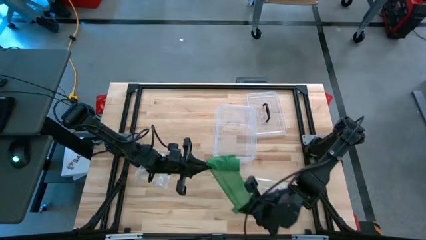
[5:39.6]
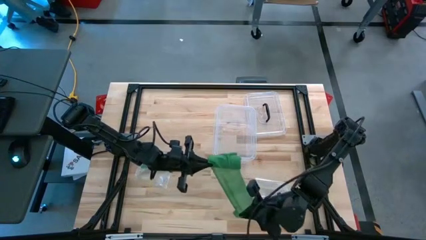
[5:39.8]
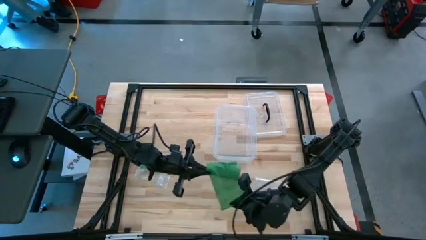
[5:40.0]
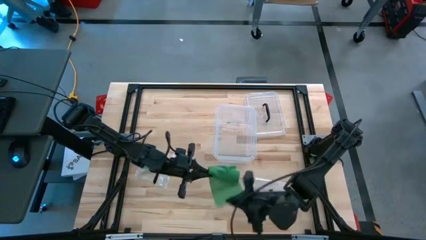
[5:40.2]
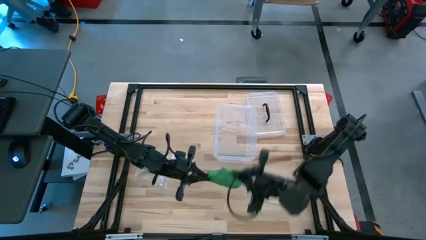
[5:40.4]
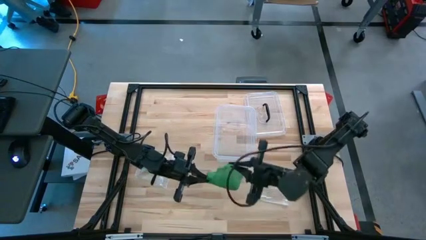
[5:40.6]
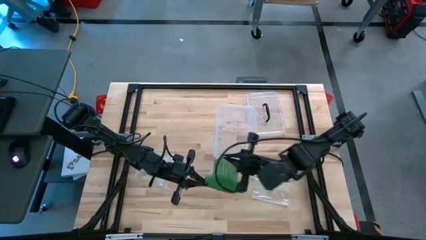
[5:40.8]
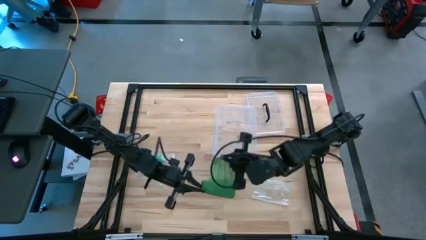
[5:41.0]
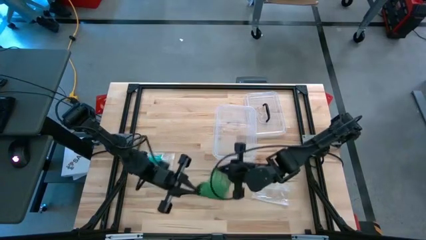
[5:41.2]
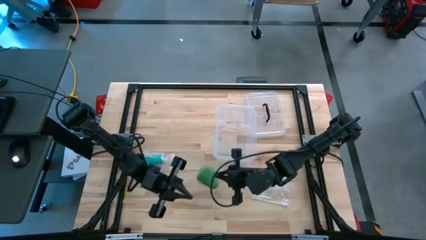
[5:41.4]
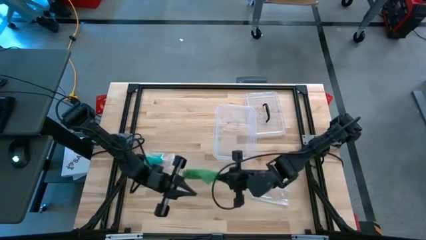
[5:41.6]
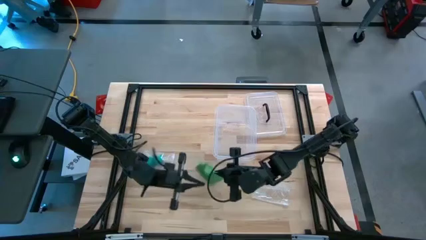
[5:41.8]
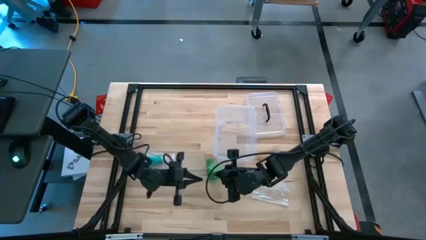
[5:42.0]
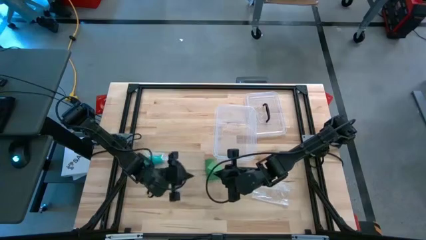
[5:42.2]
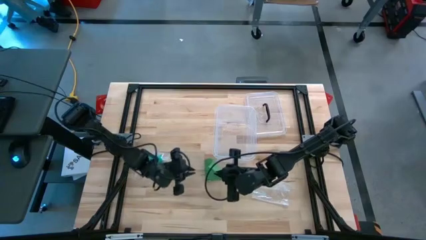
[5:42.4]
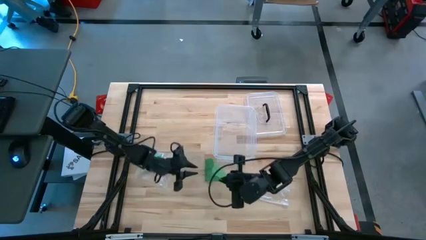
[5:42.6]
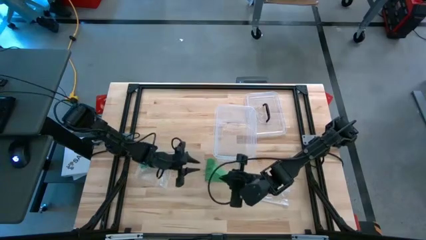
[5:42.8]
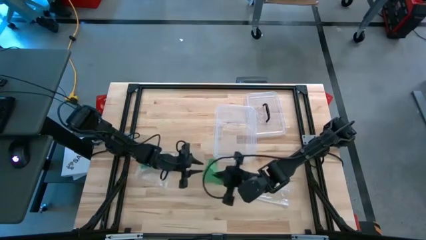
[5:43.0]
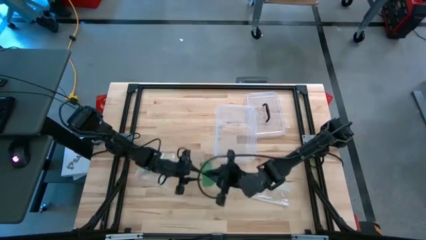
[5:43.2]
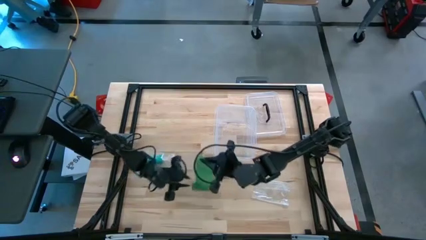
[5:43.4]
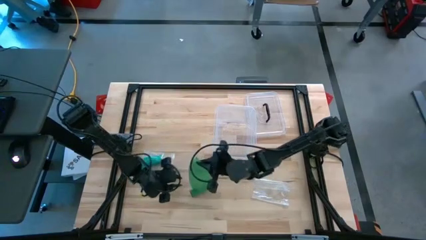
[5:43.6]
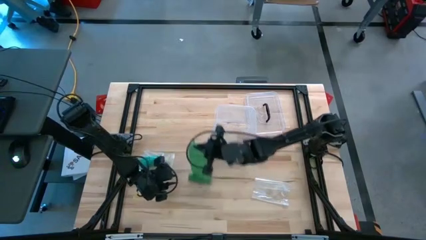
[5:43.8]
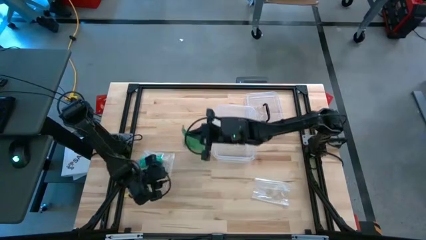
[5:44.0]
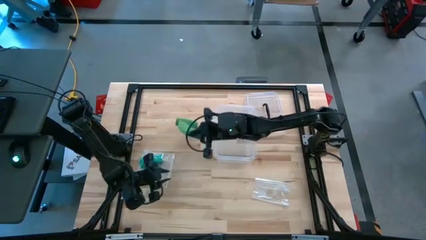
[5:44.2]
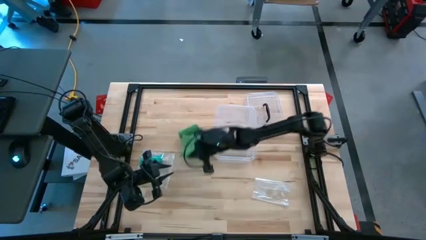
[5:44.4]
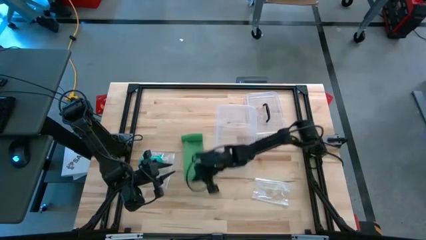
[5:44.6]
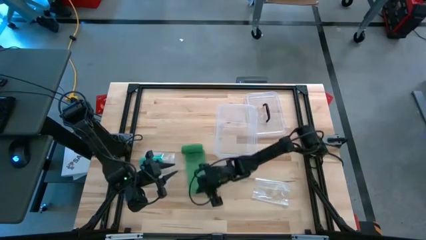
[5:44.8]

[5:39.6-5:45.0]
Task: Roll bandage
Roll the green bandage

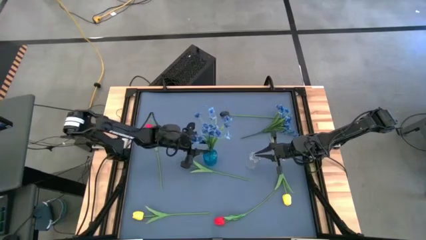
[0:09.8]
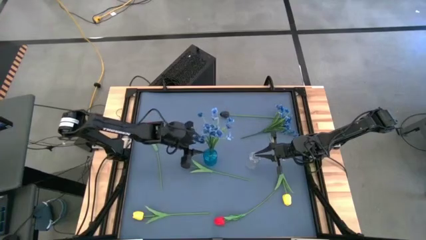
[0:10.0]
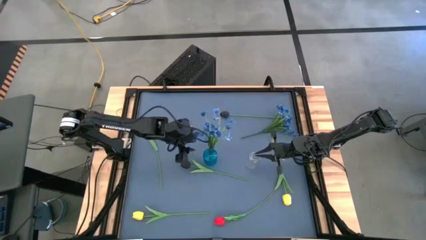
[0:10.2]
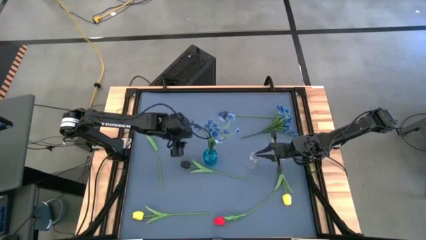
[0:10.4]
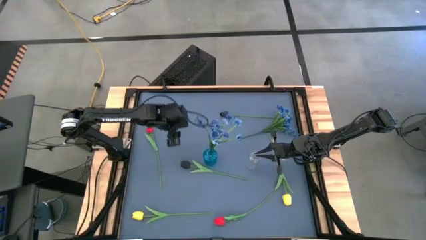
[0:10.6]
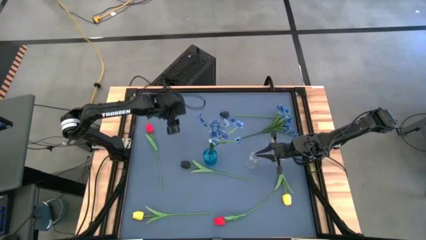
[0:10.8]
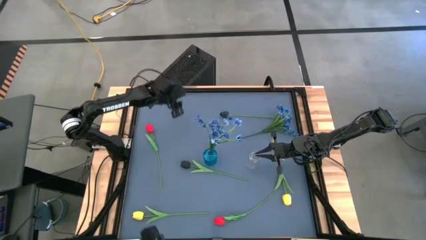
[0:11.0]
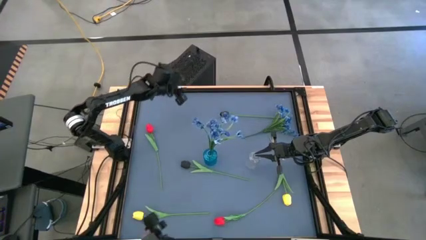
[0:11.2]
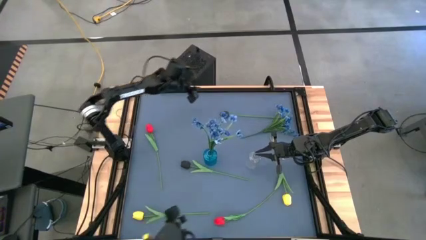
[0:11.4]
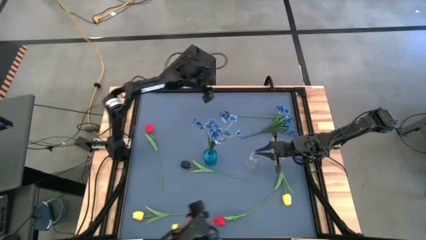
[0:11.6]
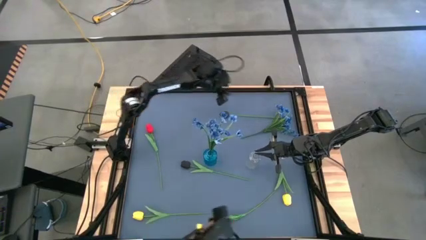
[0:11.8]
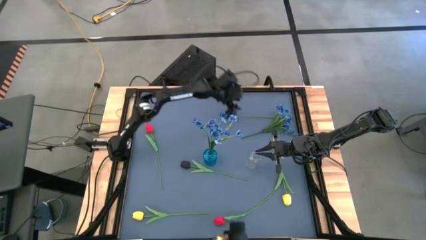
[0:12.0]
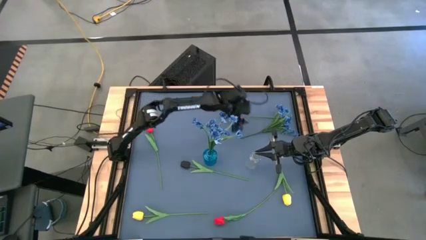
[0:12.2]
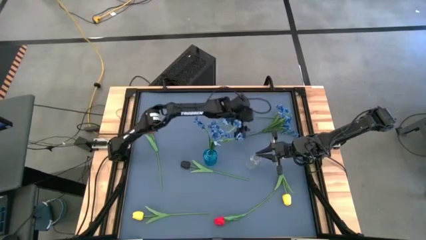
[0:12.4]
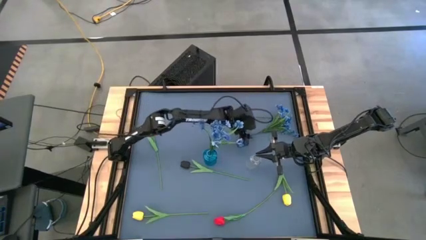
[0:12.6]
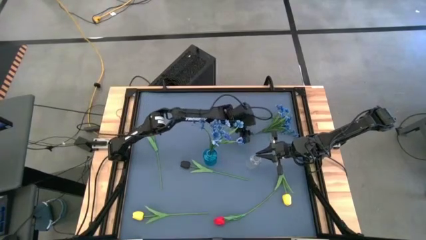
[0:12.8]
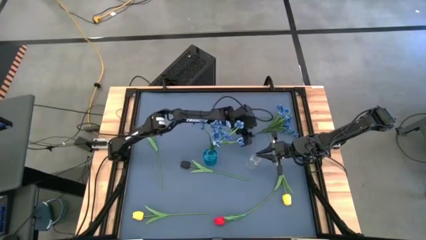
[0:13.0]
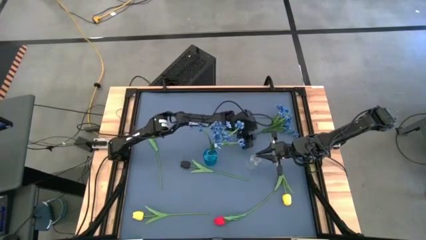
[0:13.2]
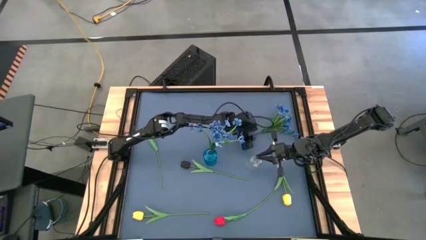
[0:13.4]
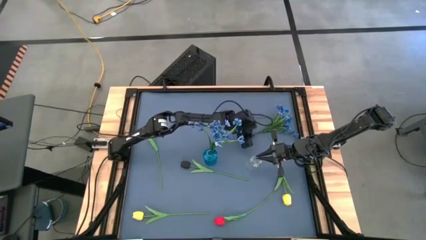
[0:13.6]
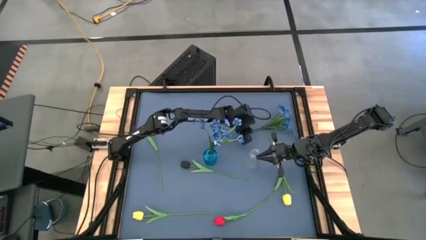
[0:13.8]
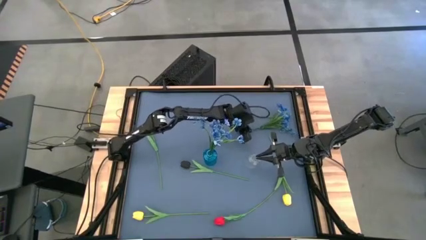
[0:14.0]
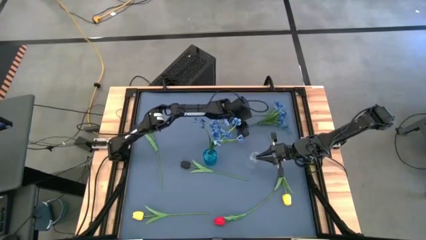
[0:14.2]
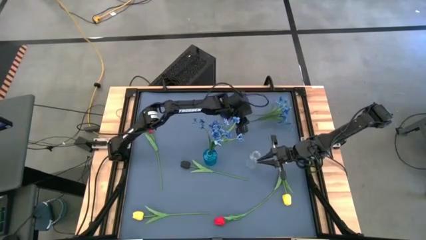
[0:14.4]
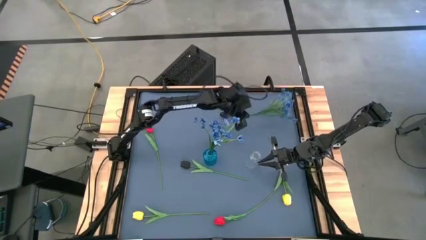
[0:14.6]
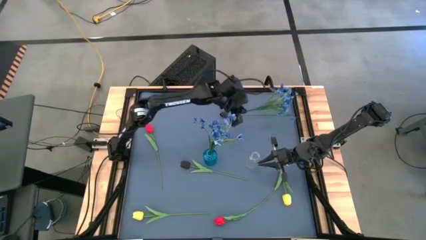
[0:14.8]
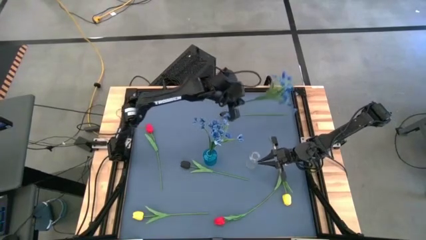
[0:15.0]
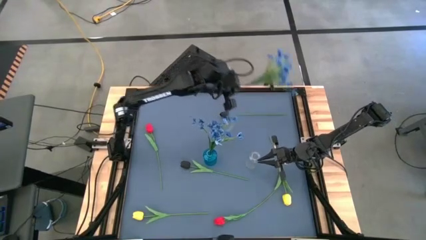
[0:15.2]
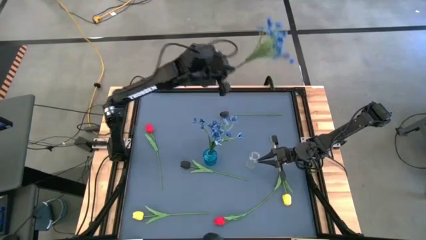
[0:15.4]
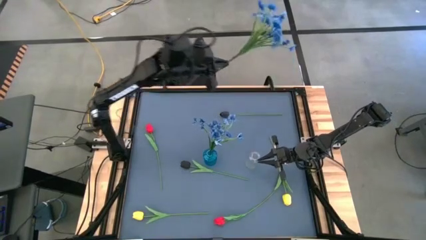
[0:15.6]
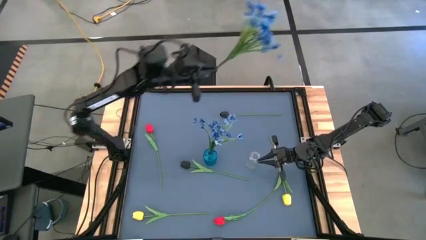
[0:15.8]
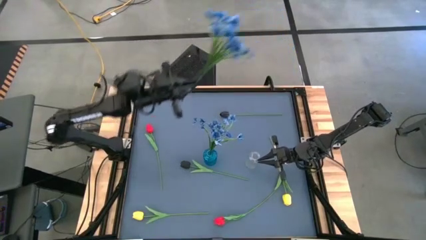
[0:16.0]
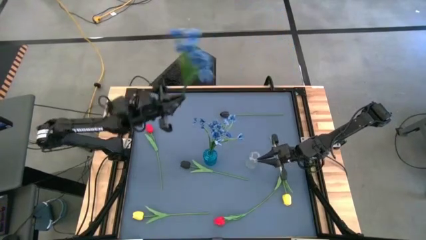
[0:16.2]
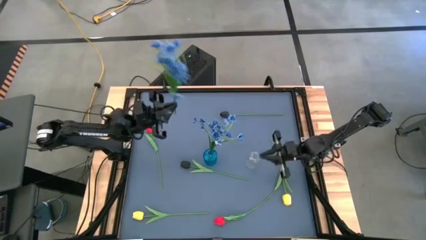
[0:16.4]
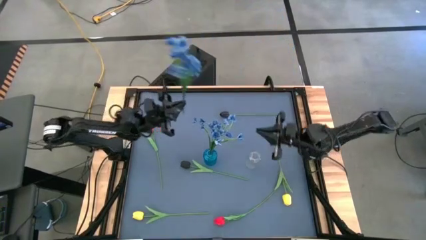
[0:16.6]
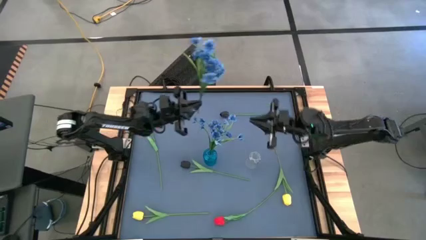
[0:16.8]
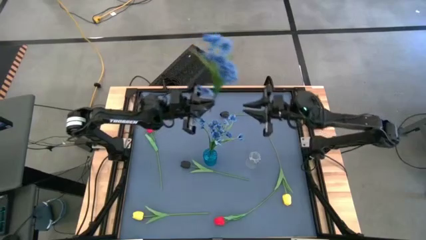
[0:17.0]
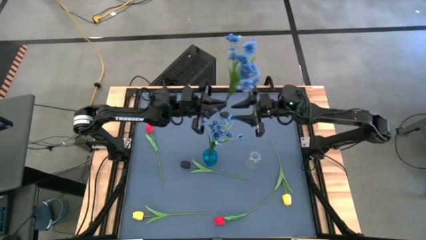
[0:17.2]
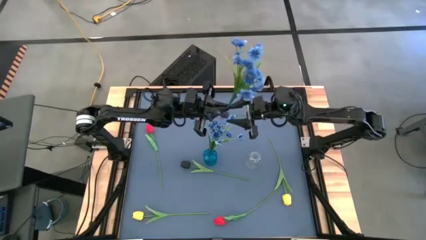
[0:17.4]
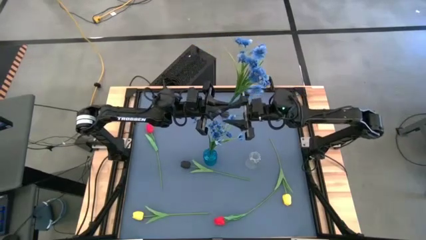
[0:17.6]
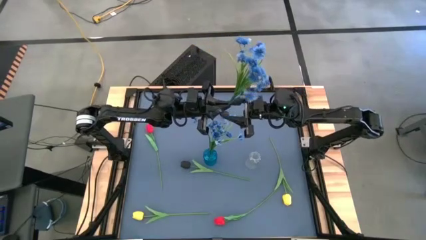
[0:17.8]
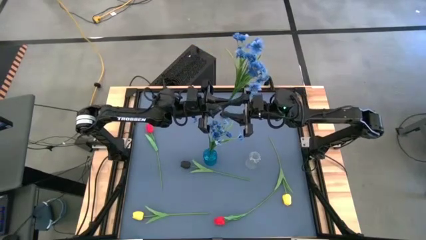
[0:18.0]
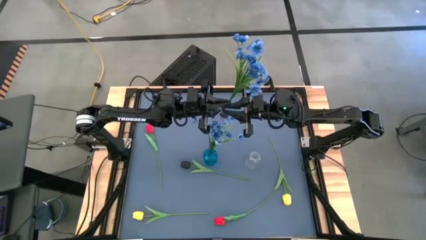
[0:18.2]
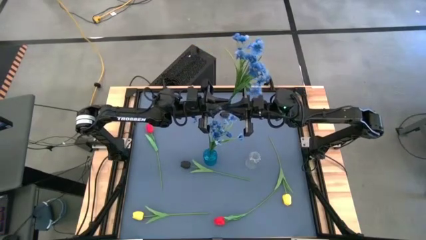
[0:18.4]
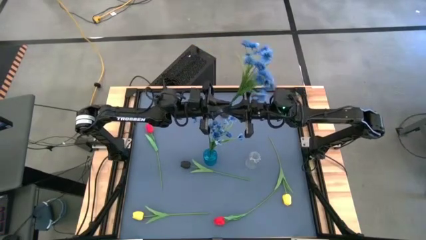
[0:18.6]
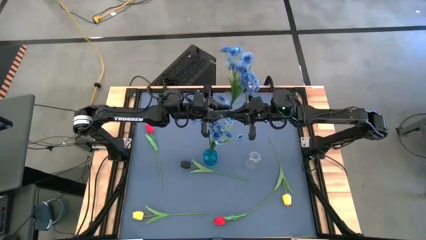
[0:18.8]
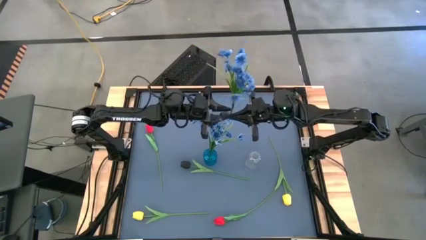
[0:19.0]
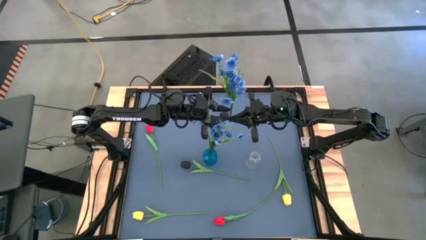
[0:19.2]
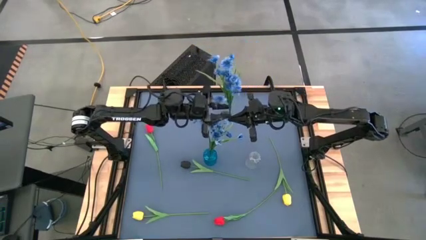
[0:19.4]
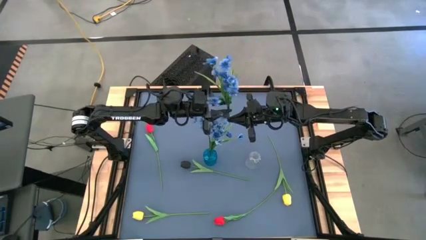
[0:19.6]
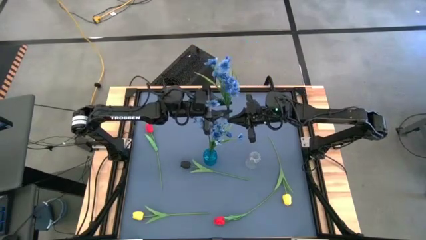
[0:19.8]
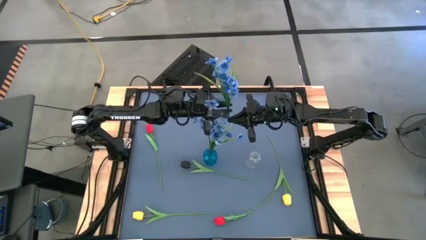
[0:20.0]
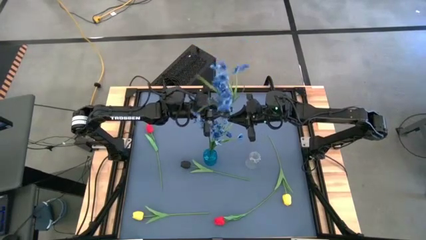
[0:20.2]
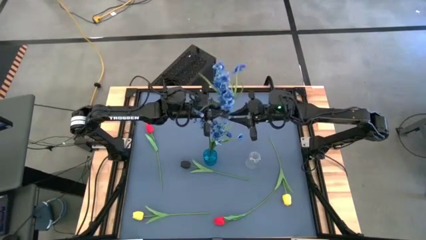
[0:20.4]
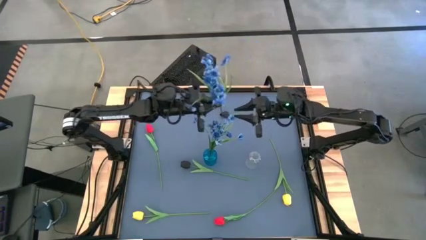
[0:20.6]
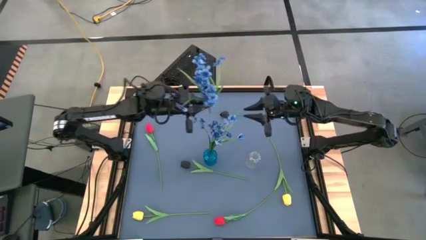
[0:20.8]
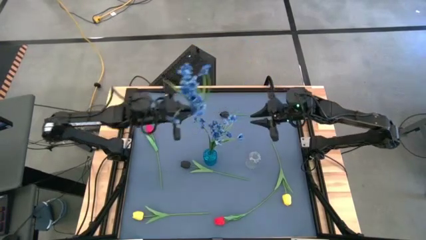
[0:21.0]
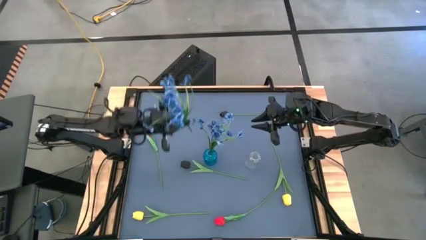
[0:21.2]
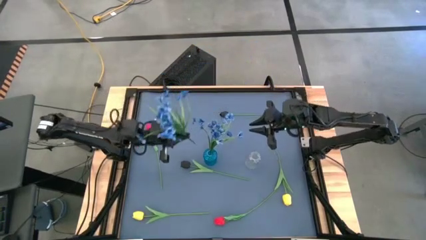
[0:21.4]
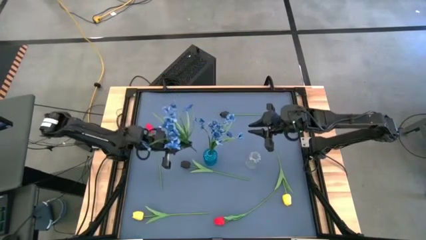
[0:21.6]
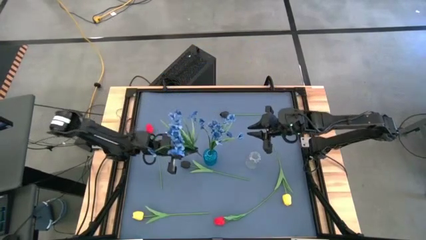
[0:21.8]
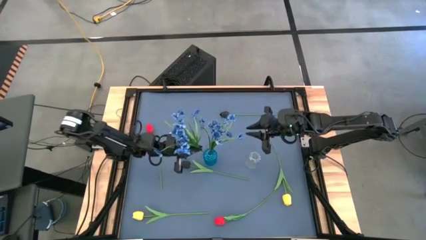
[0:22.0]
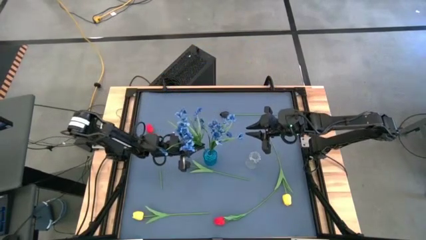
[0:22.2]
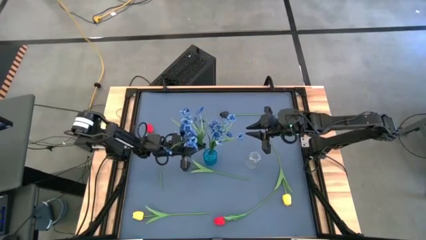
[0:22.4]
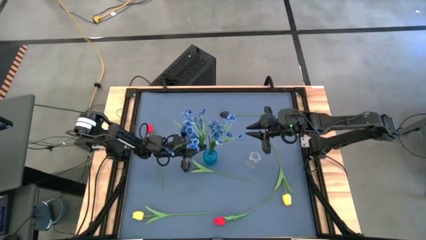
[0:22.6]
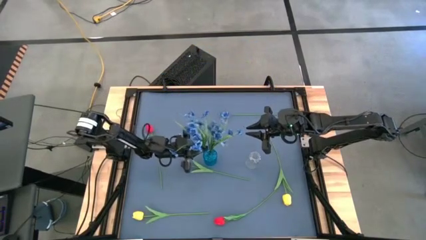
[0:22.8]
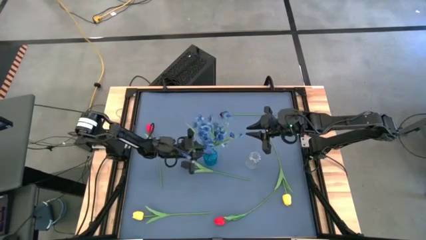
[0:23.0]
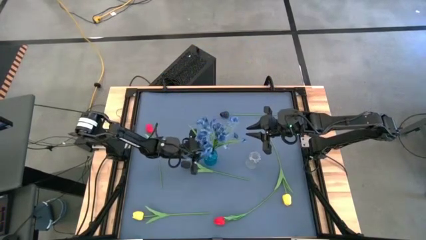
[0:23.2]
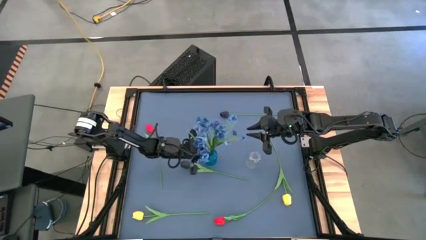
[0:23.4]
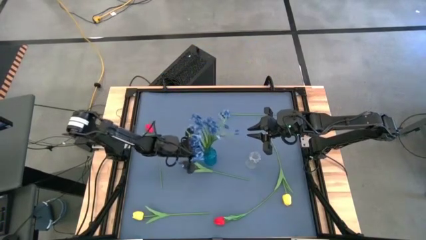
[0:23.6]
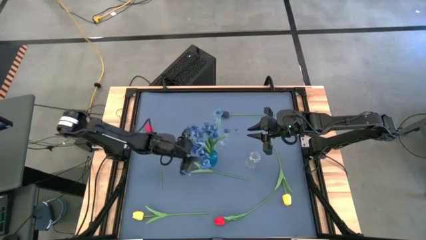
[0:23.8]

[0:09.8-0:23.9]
Task: Sort flowers into vase by color
Put the blue flowers into the blue flower vase
